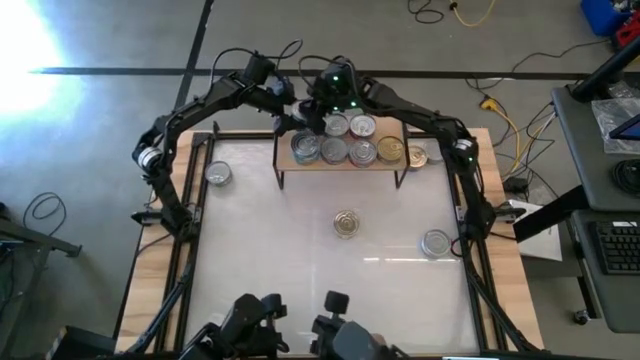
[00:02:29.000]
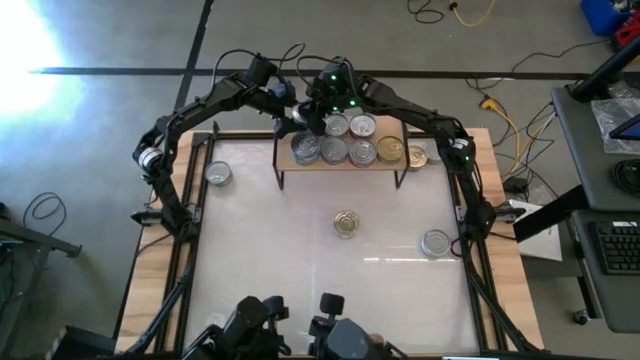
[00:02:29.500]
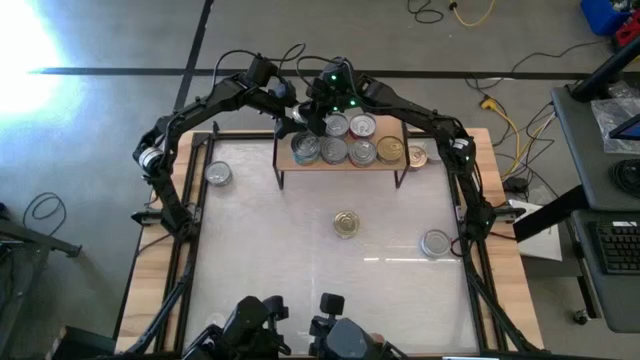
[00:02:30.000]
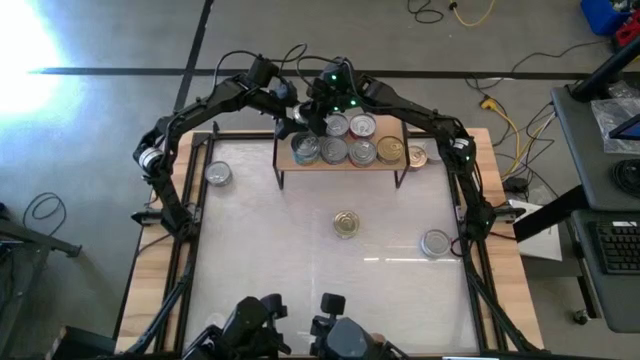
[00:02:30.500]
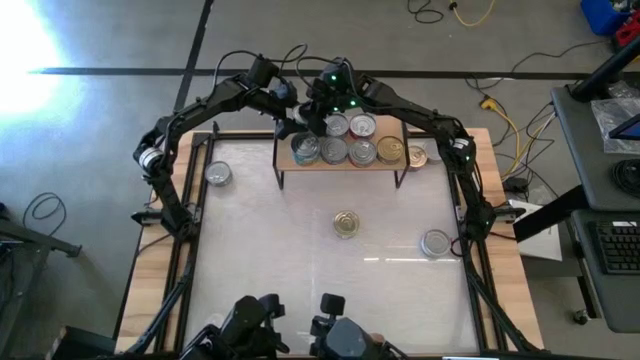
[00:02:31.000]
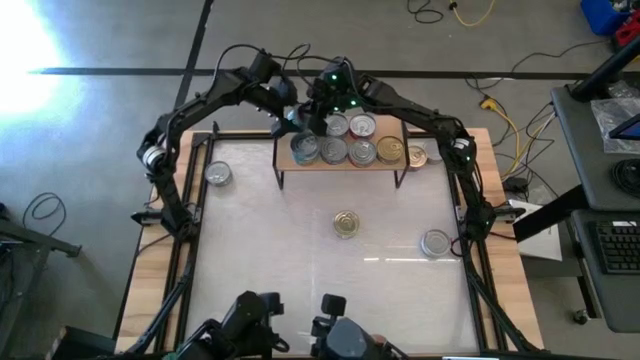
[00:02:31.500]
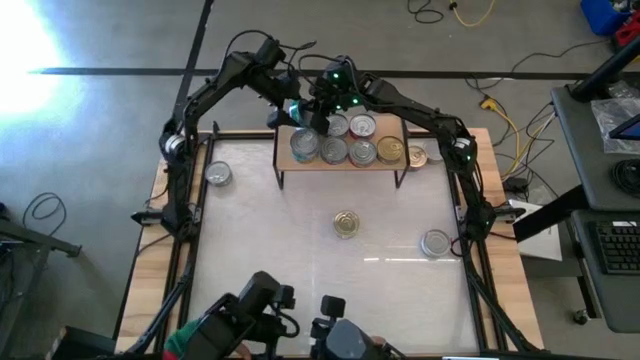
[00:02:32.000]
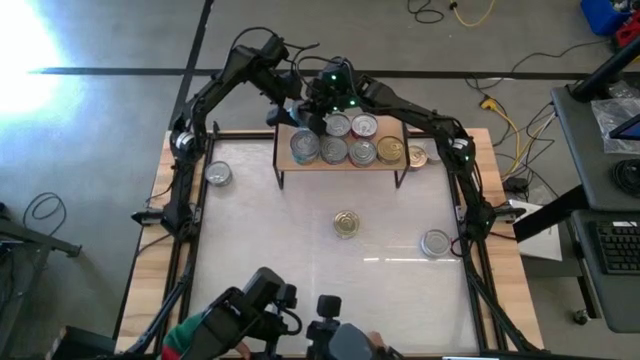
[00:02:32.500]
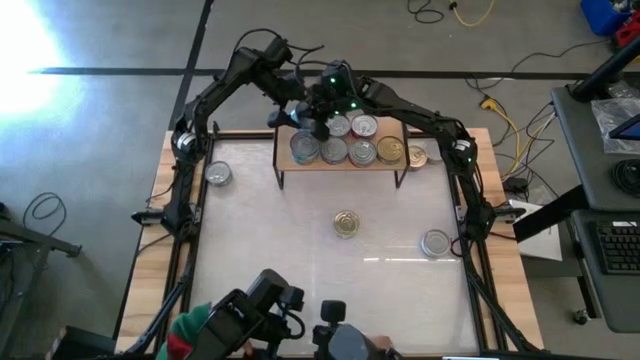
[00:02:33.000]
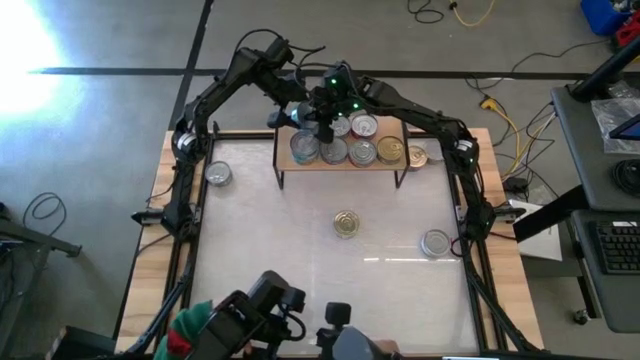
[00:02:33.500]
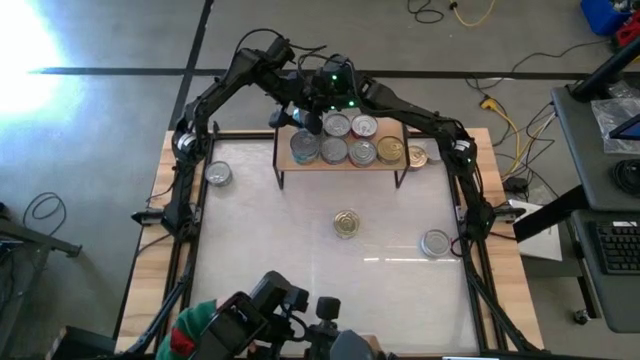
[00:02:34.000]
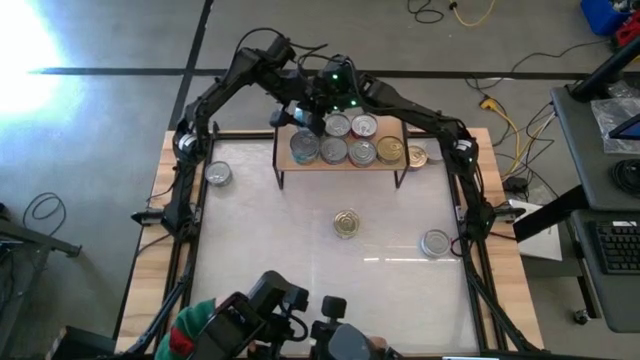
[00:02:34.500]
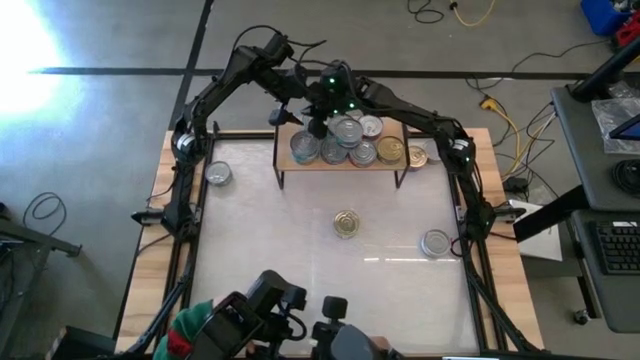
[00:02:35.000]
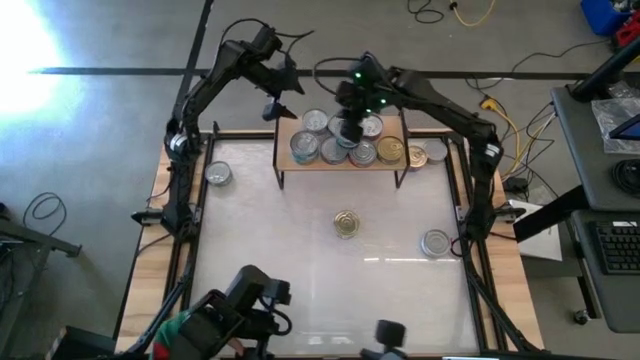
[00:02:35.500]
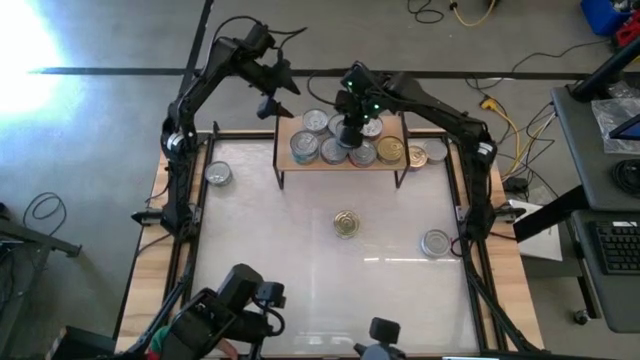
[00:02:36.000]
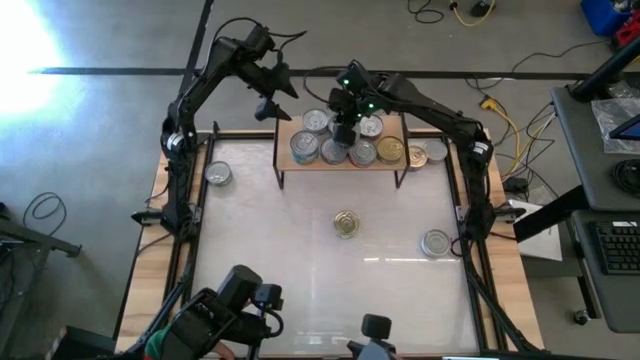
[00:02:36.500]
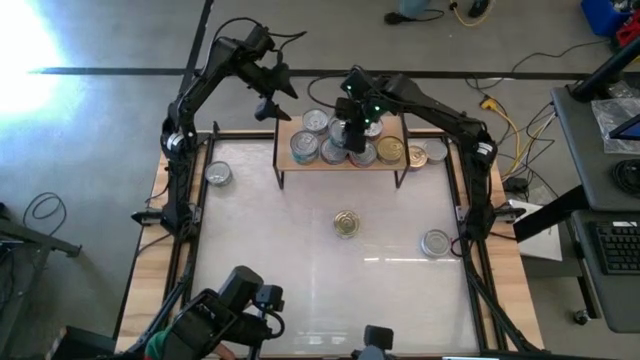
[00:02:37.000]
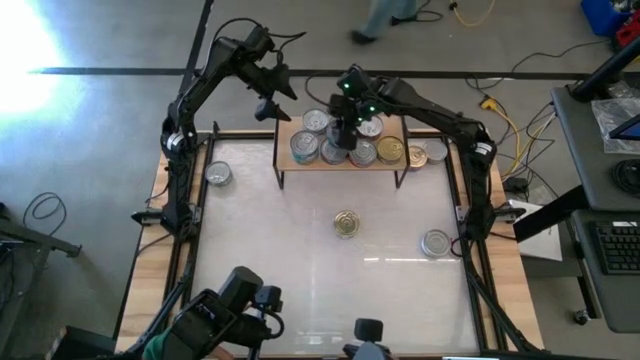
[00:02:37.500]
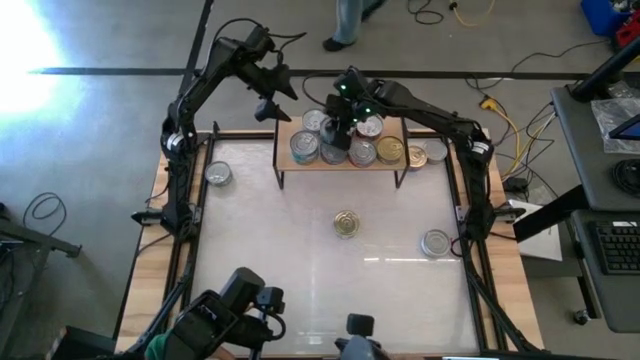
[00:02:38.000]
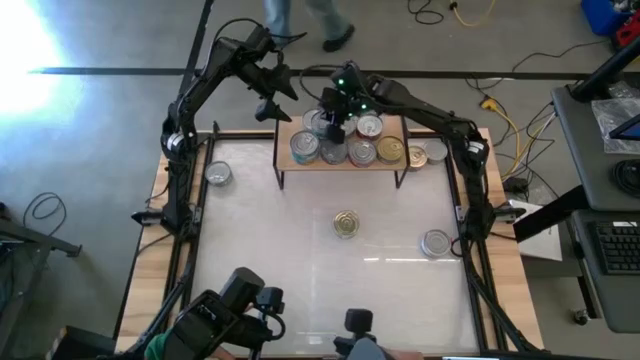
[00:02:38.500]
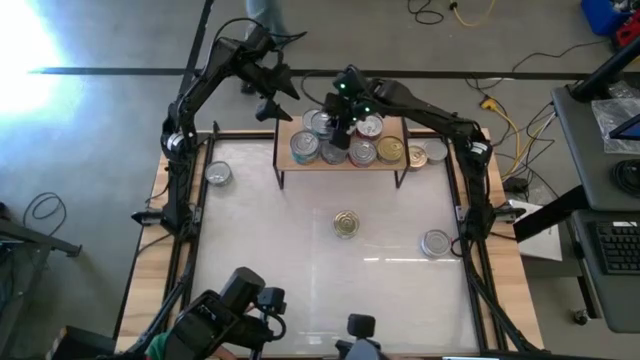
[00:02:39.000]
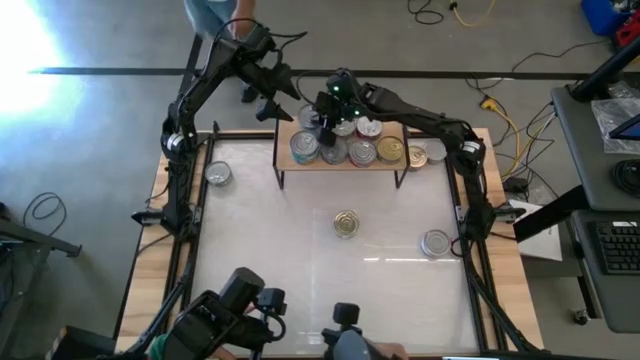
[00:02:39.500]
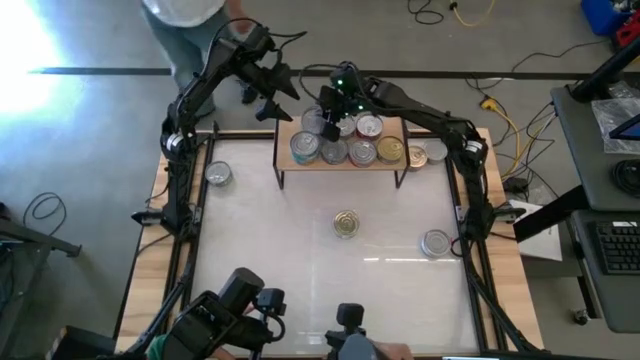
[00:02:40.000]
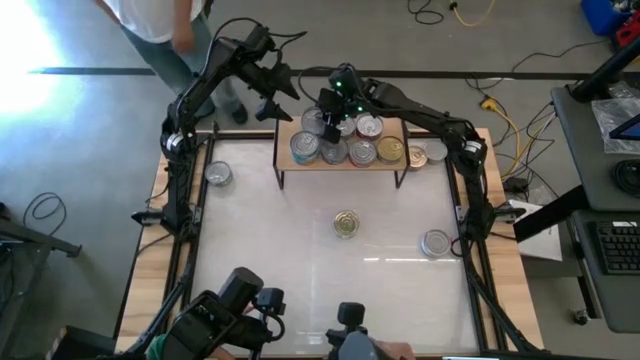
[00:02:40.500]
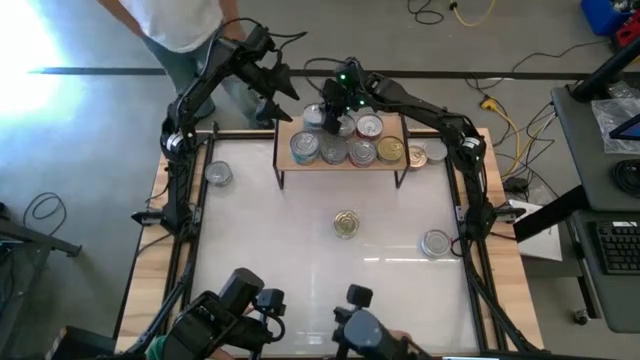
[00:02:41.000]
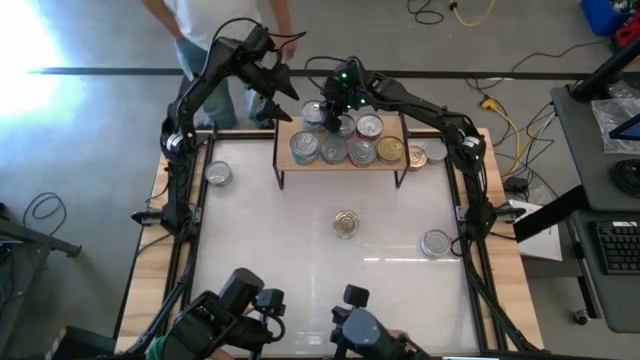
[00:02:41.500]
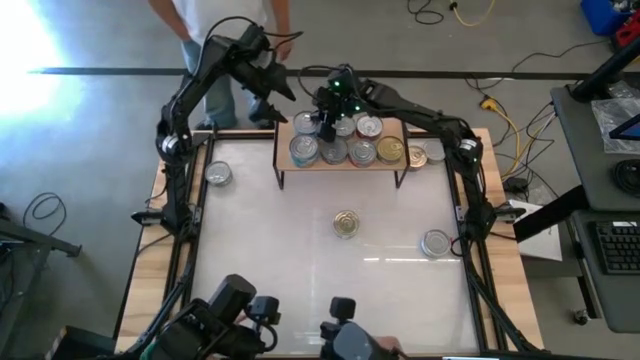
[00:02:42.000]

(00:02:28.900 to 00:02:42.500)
Task: Stack canned seafood by type on shelf
Stack the yellow-blue tuna can on top of the other yellow-blue tuna can on the shelf

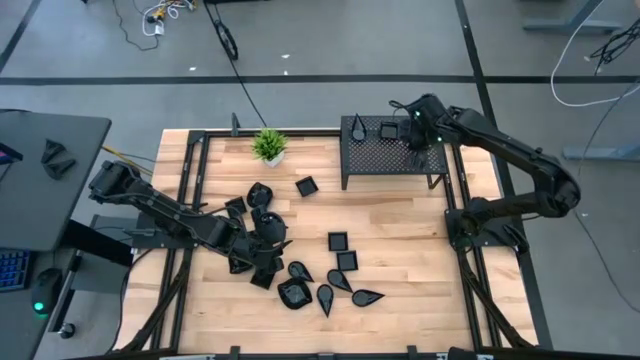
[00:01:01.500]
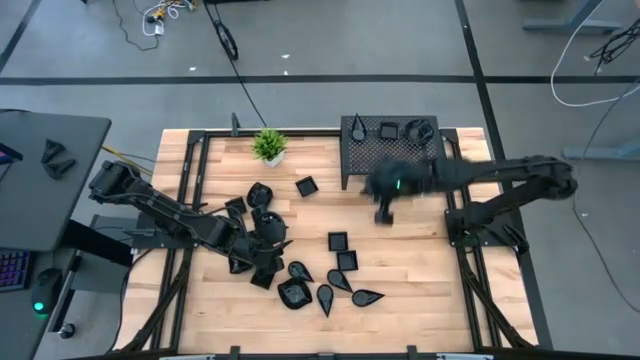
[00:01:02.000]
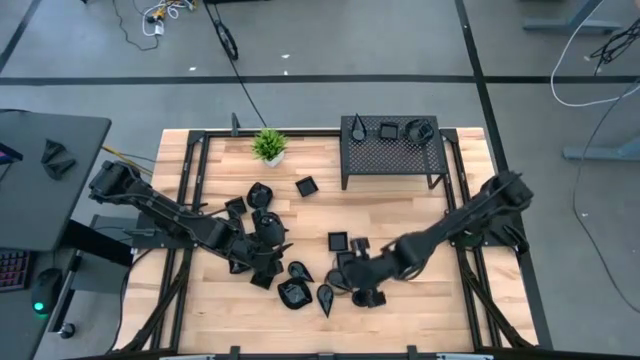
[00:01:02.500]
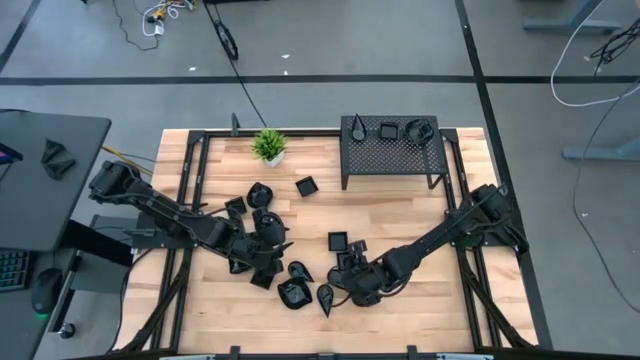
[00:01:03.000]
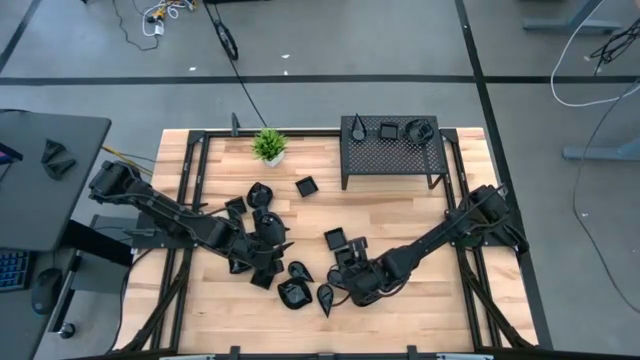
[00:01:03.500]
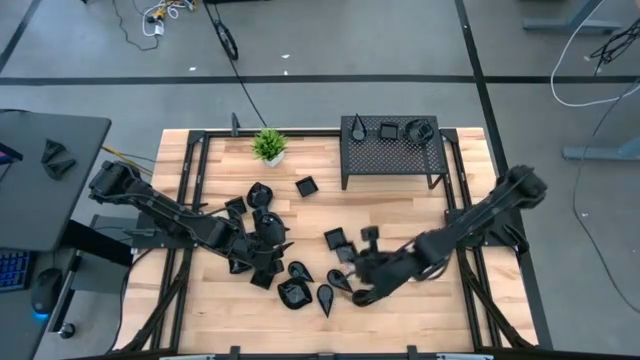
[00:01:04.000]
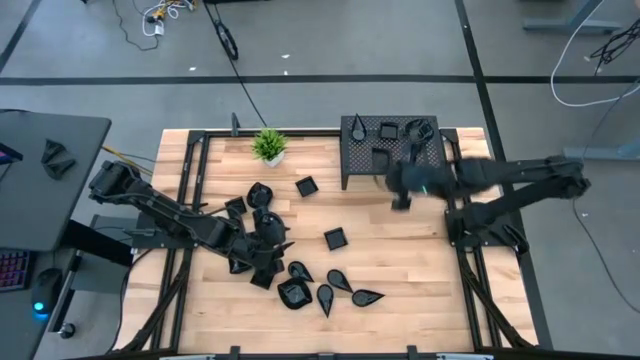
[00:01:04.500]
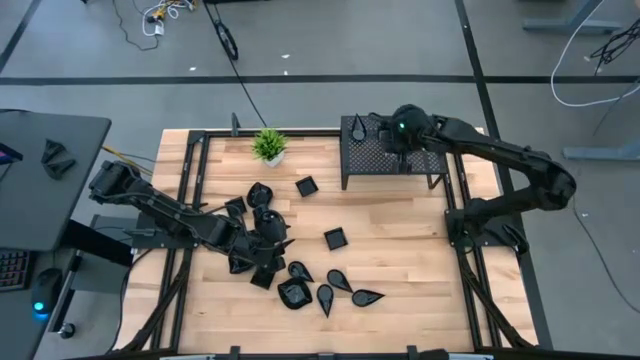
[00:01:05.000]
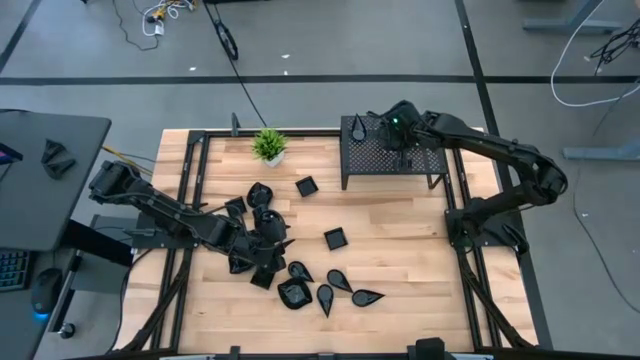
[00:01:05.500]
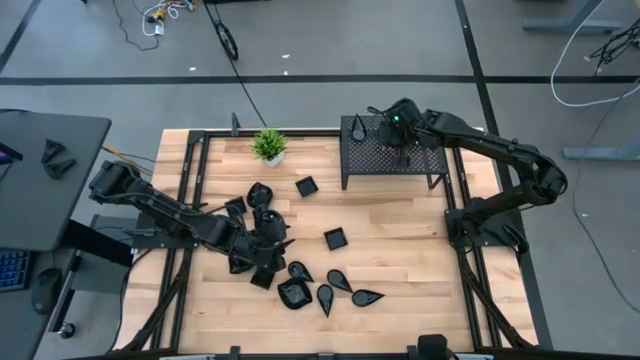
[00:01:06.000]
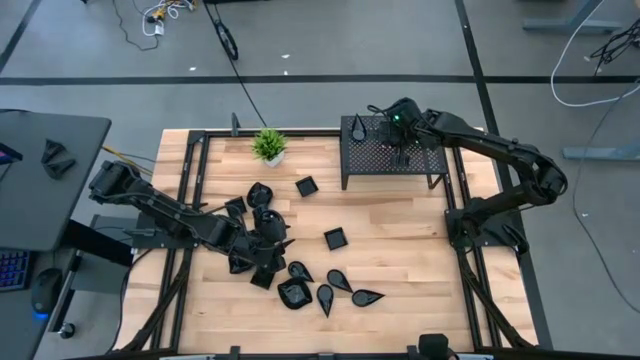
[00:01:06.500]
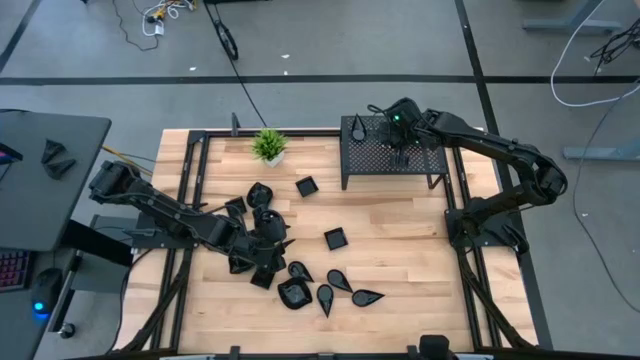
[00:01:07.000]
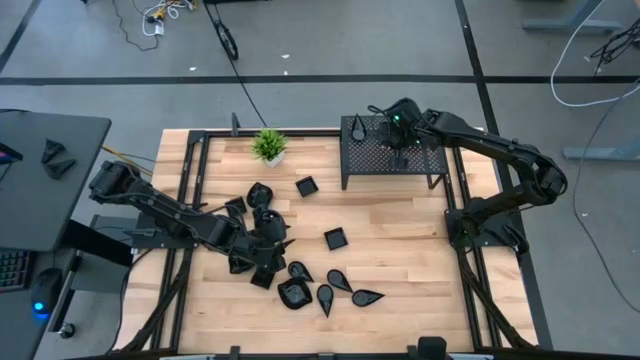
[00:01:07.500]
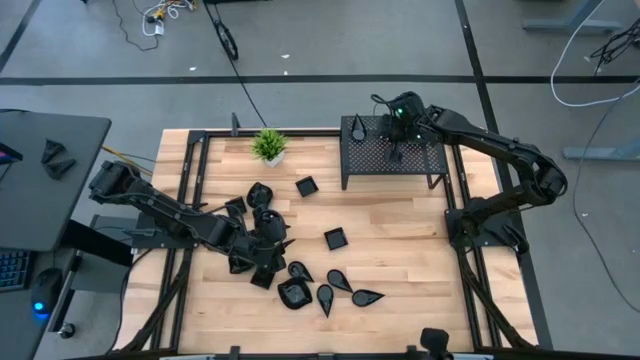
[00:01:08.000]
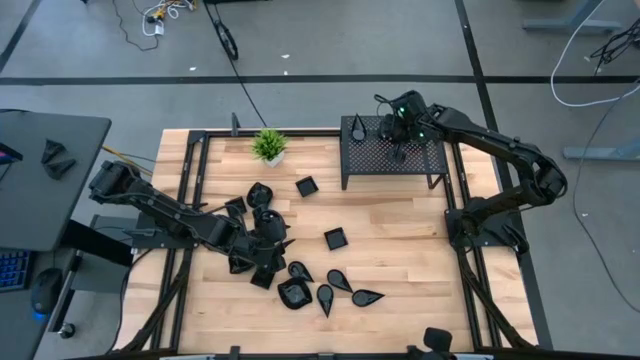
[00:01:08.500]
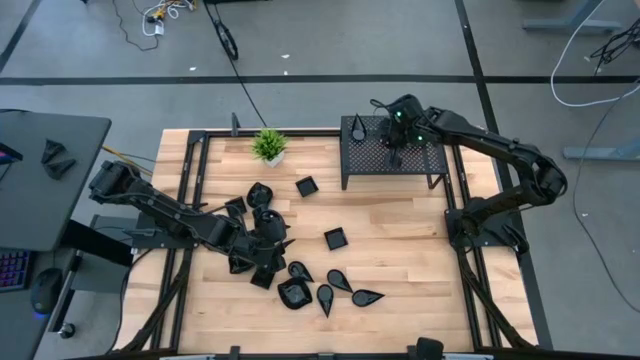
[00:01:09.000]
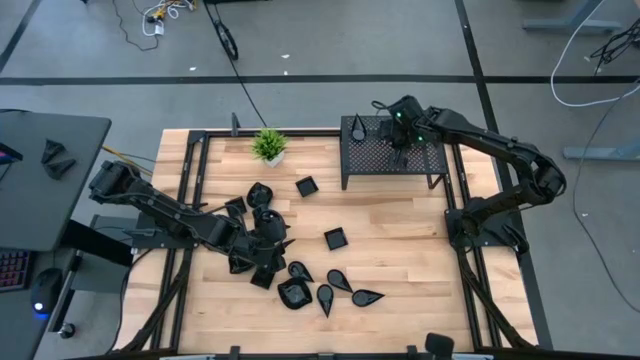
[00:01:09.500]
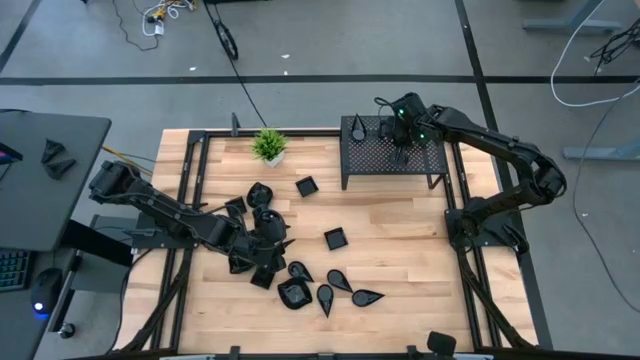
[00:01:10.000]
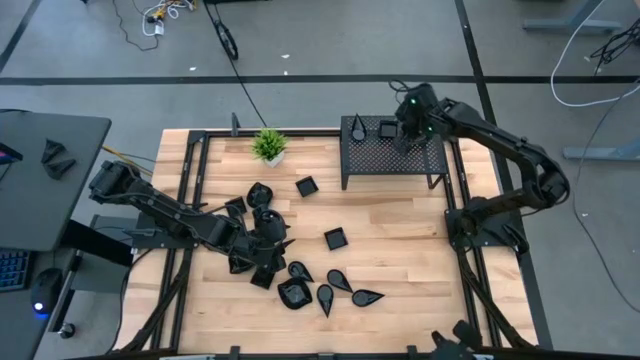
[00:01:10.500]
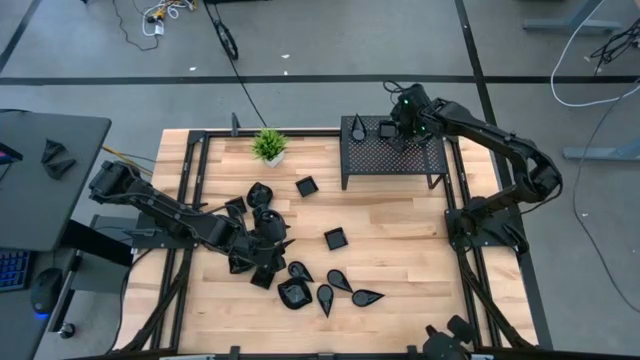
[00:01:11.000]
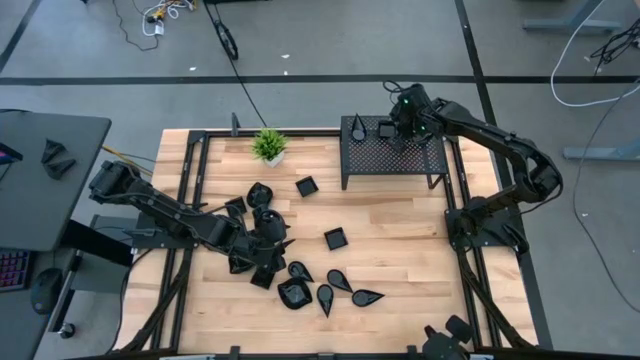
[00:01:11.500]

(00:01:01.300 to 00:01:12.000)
Task: Pick & Place Mini shaped plates
Stack the black square plate on top of the black square plate on the shelf
